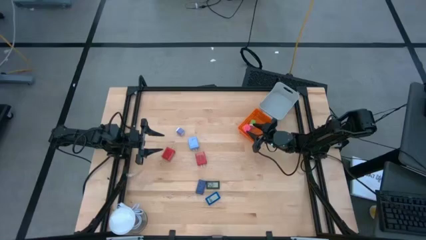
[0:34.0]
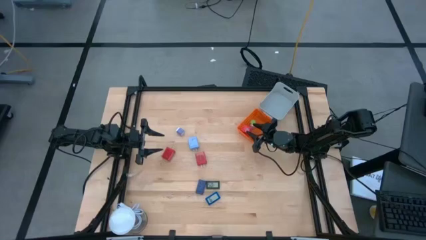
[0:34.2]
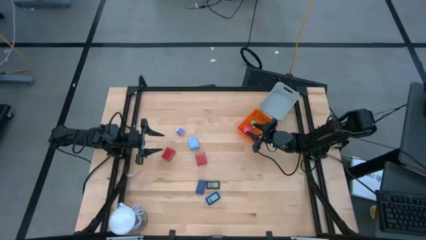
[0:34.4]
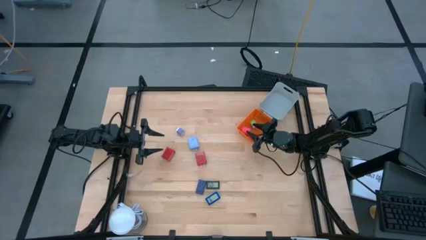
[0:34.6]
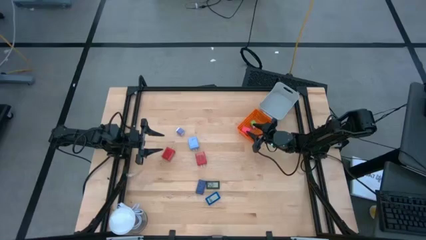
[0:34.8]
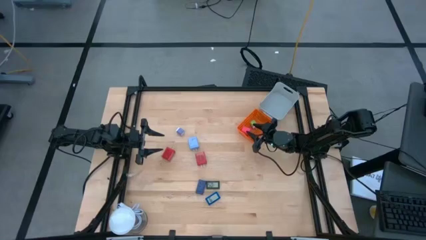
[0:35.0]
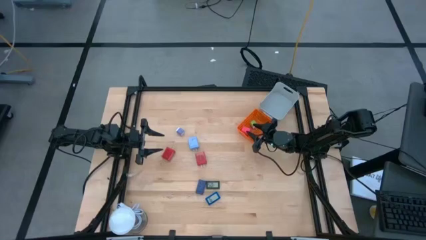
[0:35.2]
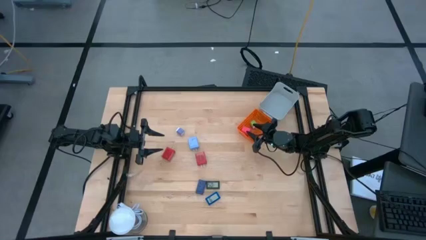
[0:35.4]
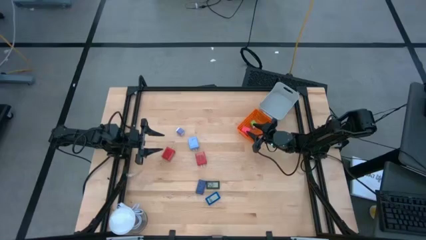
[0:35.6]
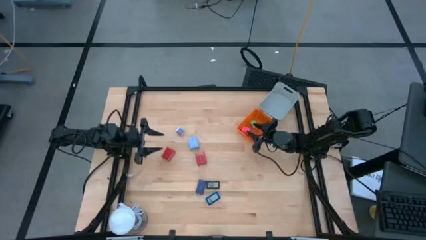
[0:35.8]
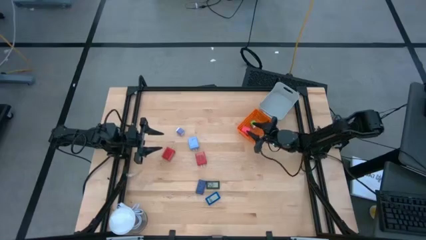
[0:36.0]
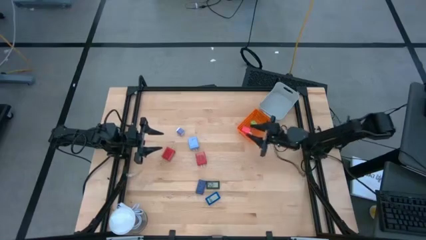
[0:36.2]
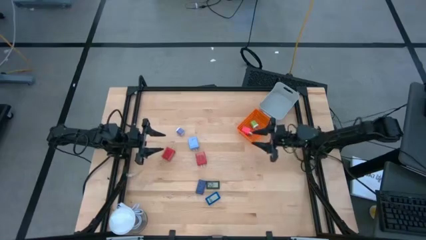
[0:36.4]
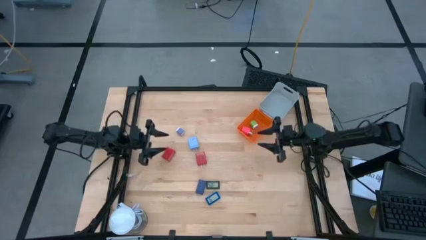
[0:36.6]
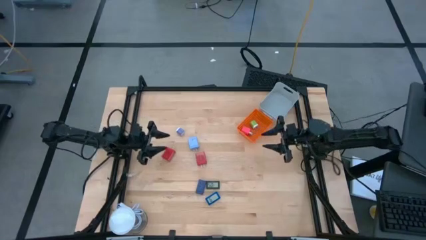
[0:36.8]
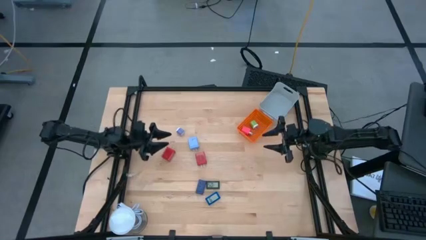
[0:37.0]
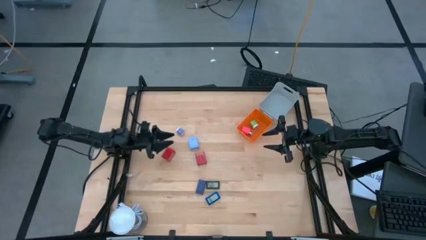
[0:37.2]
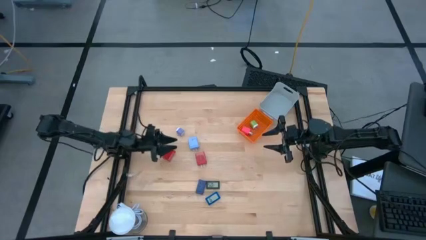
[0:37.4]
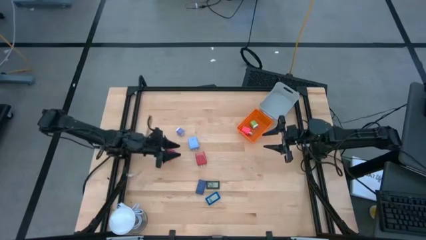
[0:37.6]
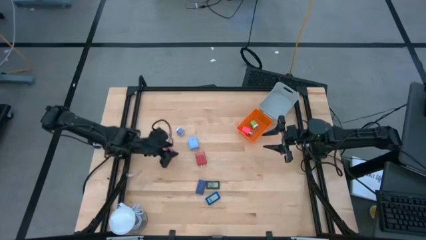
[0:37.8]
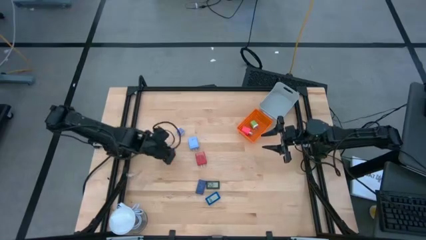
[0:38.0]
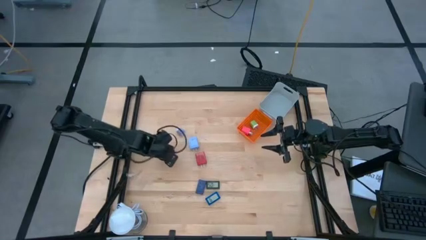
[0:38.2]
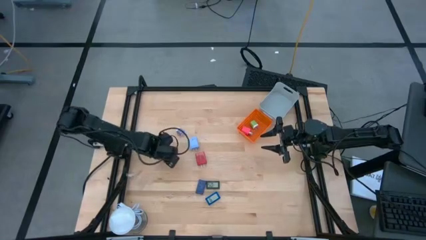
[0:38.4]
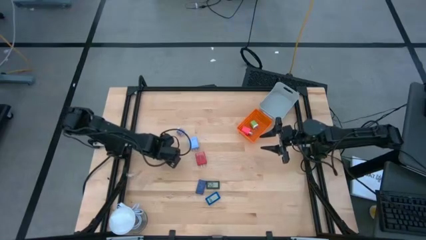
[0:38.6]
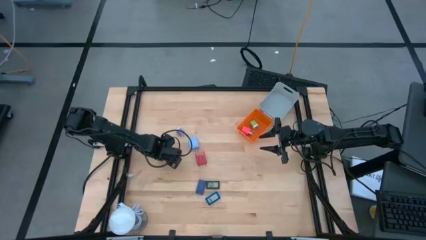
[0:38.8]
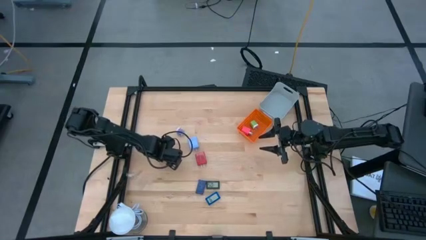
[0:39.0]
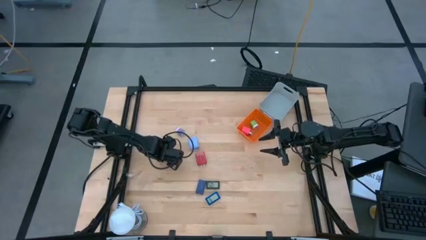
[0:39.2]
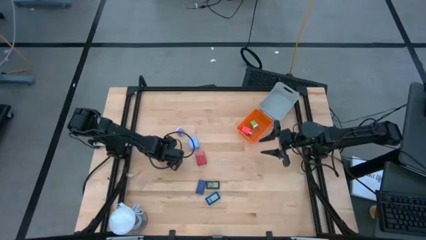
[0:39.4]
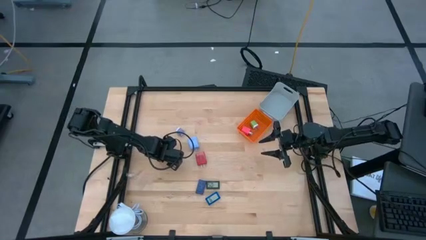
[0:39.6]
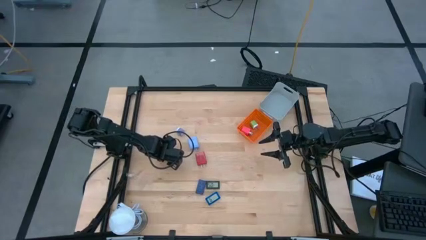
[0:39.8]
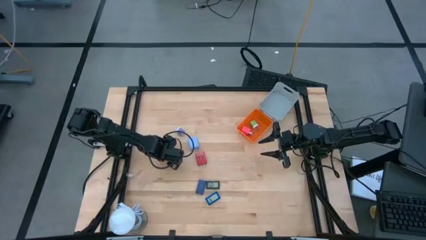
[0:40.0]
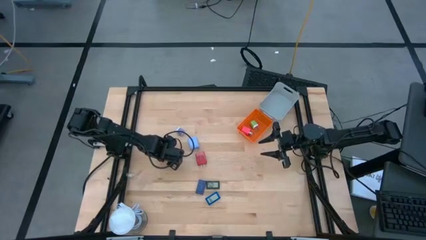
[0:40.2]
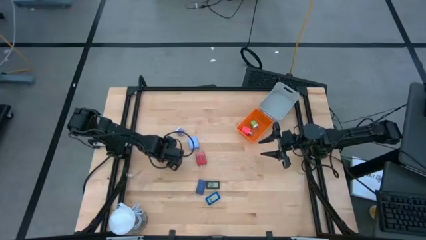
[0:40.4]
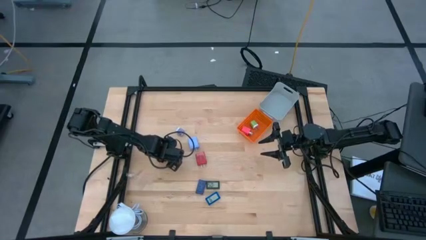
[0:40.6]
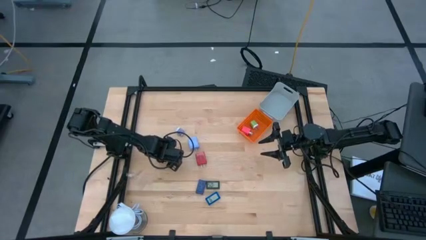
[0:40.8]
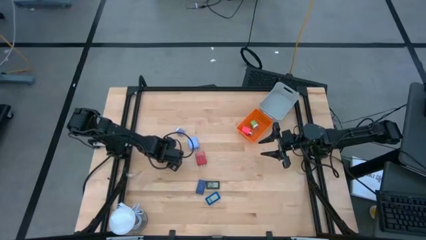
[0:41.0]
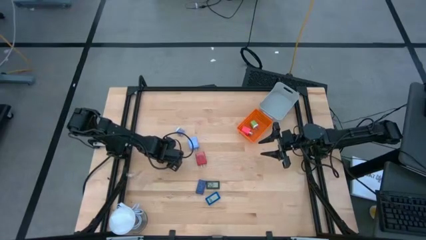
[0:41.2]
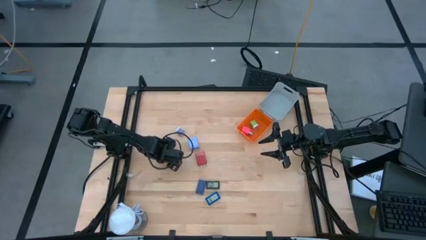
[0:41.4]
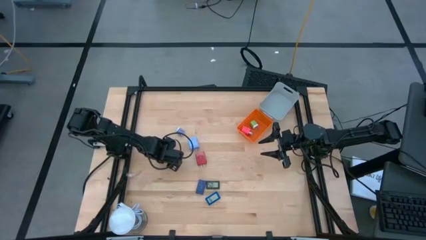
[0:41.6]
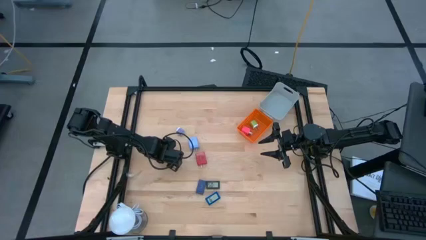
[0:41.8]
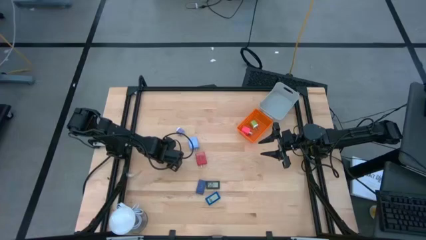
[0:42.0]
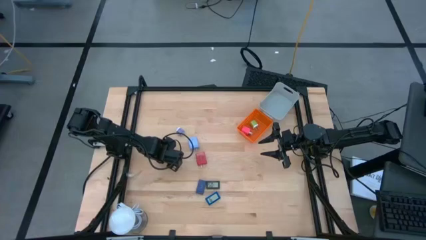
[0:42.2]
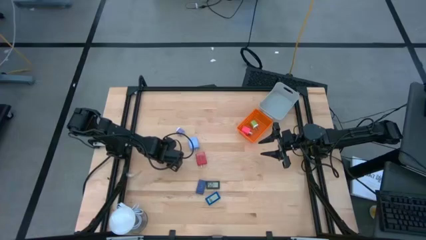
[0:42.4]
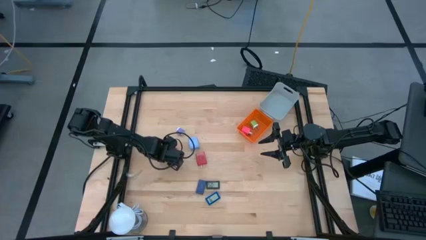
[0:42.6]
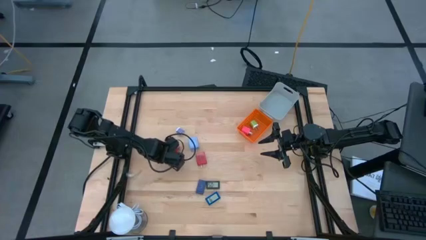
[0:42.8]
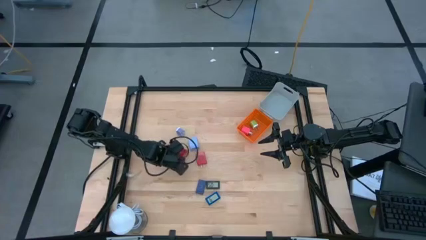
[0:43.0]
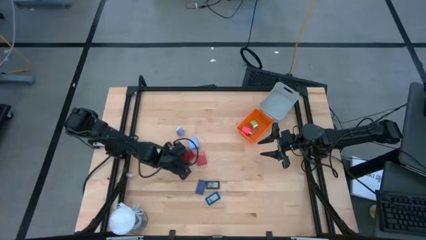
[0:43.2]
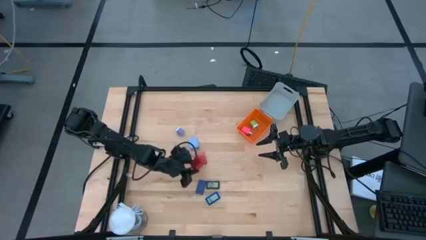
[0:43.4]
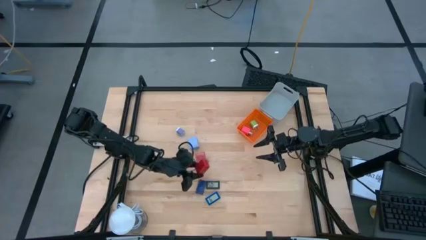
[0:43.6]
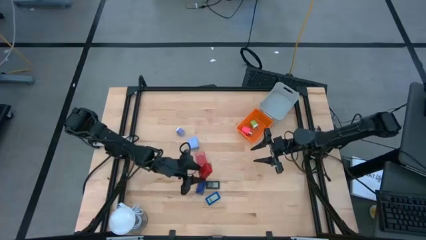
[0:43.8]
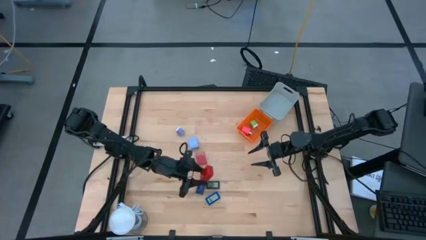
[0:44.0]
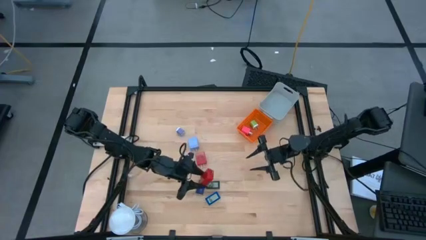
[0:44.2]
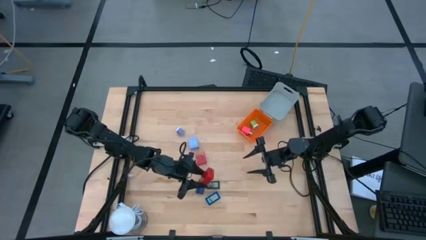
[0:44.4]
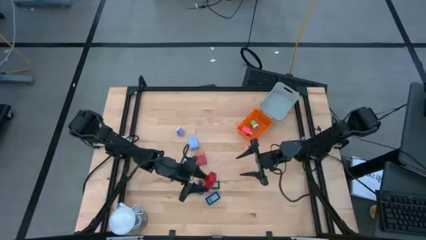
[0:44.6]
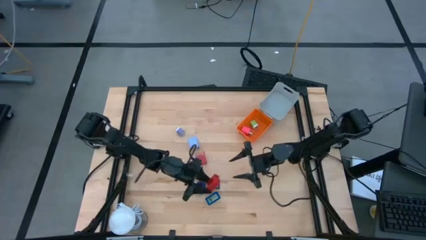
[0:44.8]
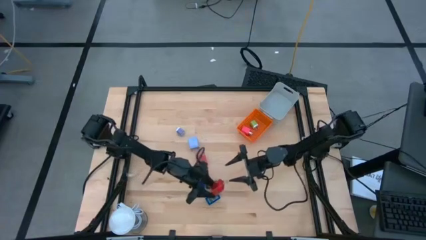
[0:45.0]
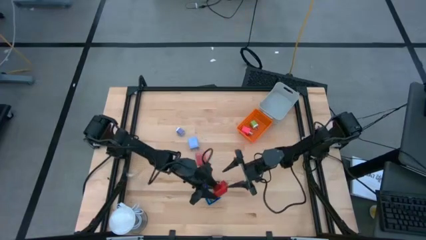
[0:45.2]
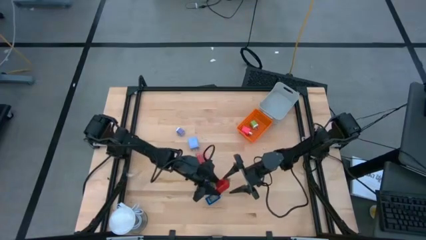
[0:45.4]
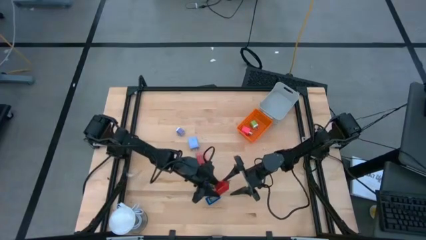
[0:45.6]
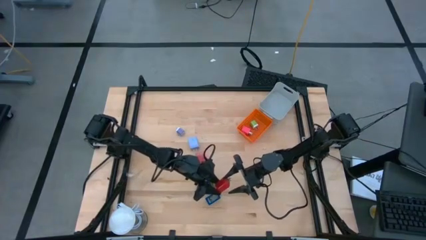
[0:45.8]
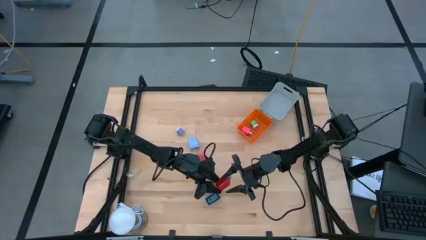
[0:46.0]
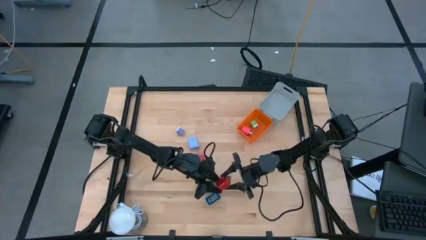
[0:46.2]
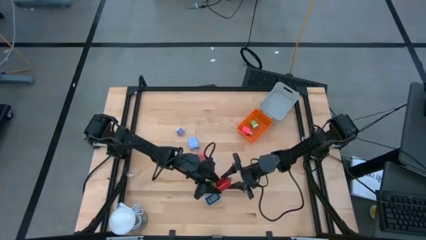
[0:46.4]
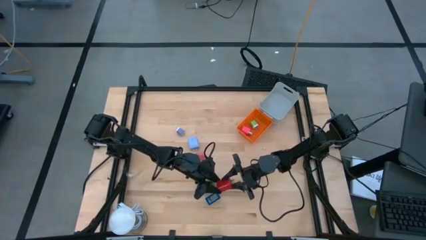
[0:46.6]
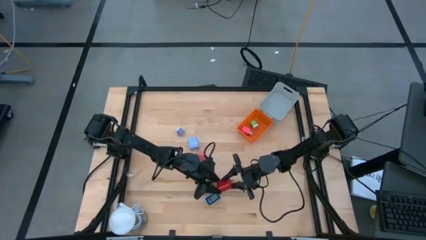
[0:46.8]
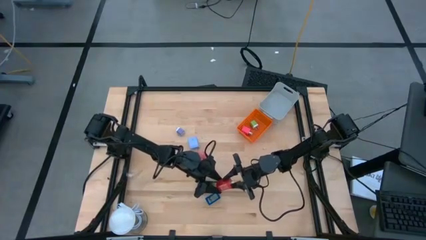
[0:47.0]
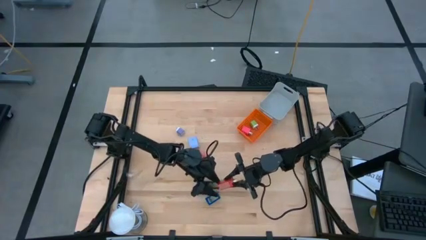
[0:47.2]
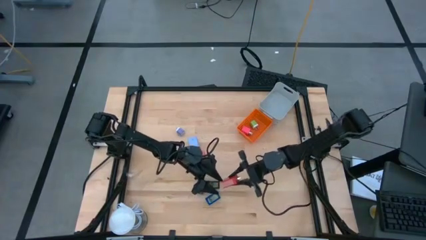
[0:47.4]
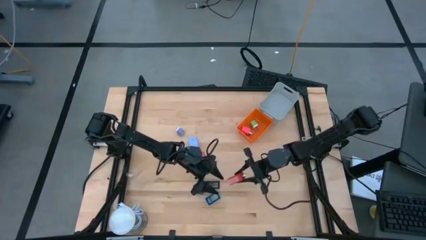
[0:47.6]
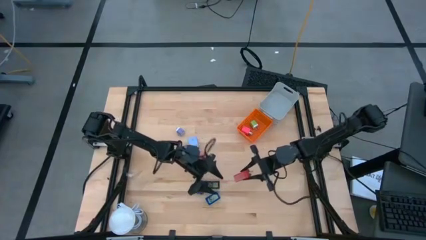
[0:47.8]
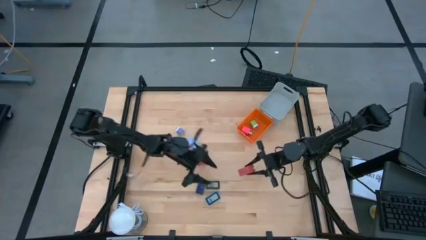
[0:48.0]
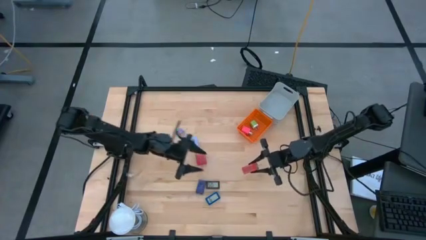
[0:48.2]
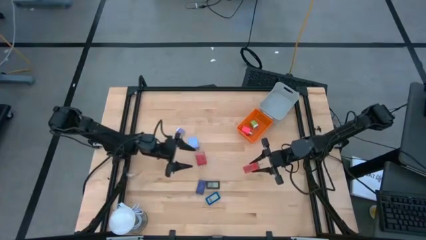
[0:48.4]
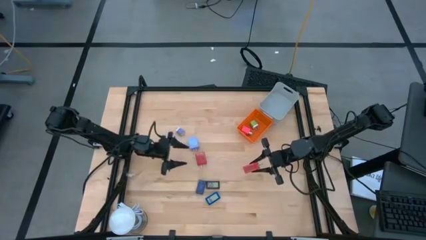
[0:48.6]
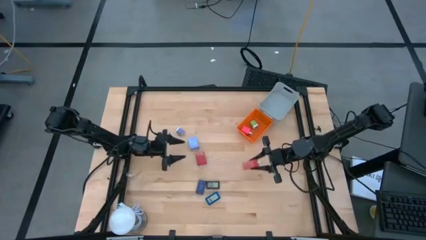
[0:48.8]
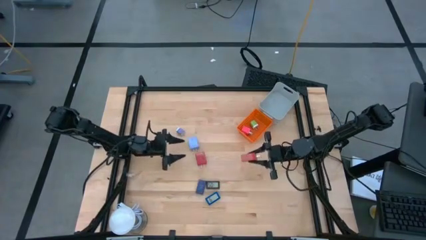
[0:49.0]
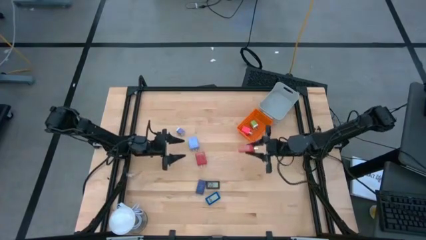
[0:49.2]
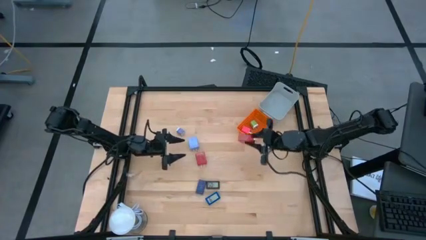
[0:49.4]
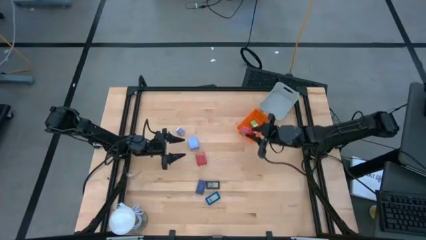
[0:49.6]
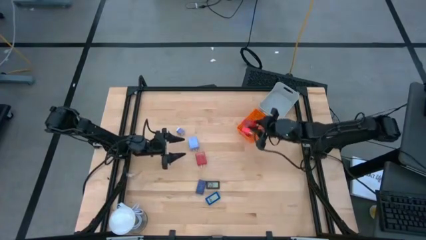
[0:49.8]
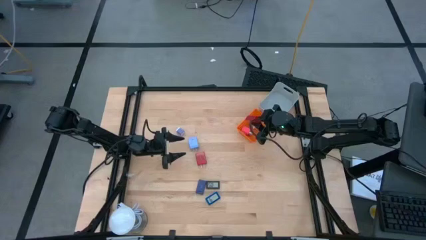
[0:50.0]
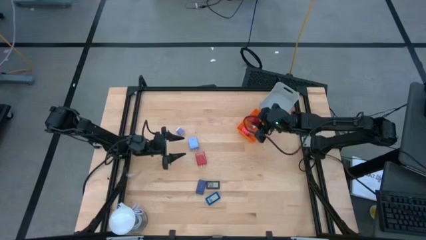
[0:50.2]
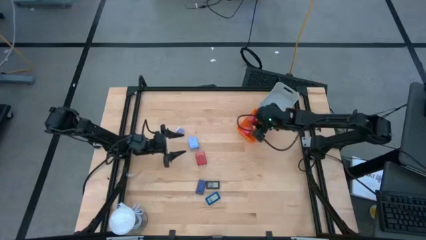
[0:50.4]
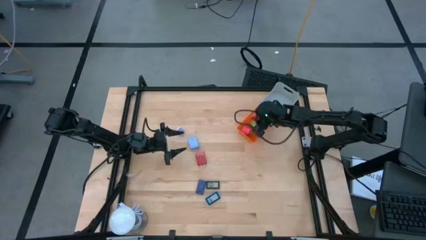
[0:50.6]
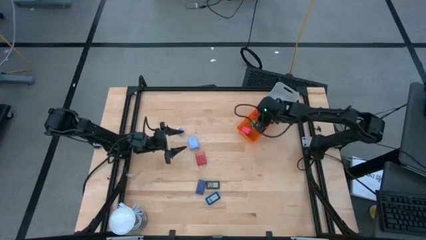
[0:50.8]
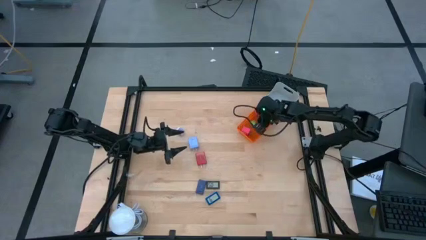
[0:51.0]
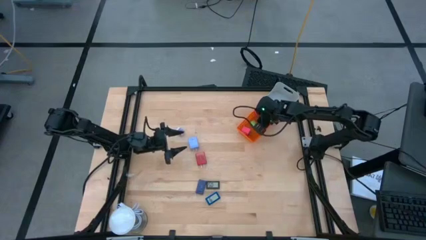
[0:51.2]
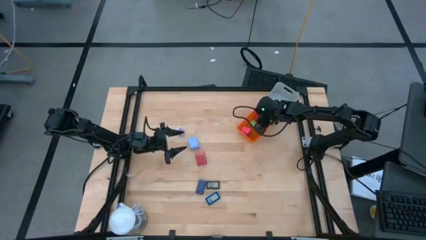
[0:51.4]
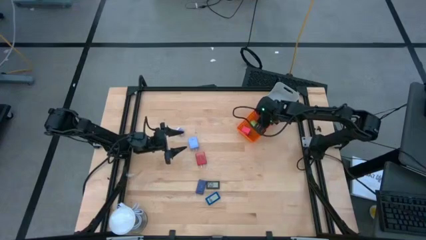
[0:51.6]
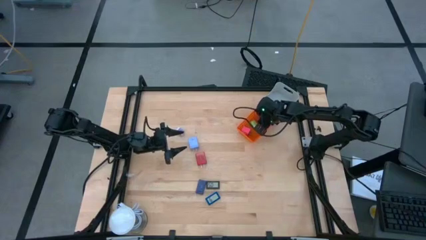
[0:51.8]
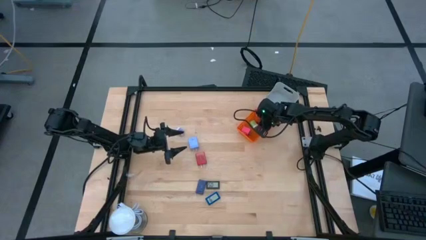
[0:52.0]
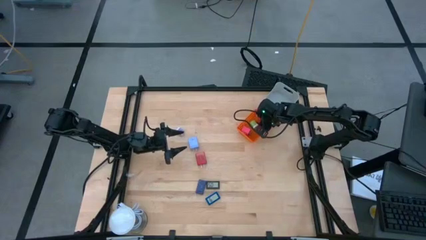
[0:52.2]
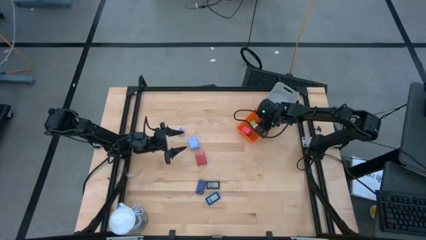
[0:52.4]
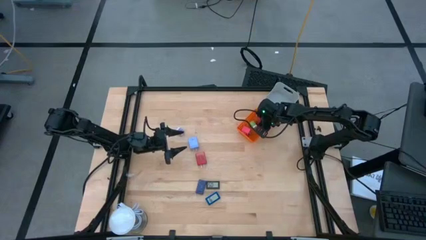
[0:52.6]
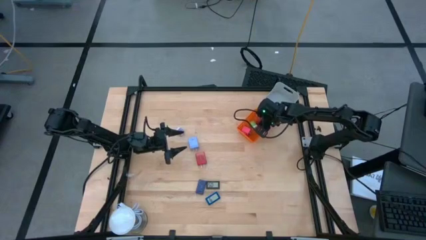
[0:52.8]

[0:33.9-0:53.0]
Task: Pick & Place Office items
Put the left red charger adapter into the orange bin
